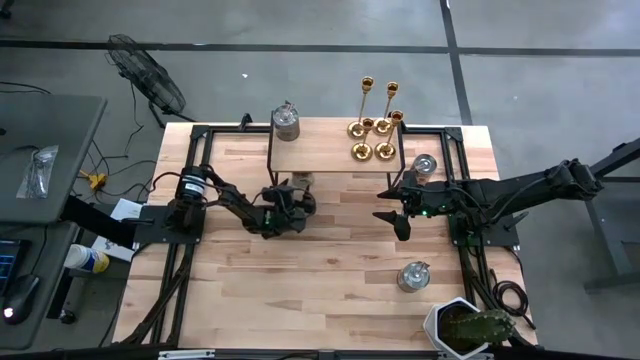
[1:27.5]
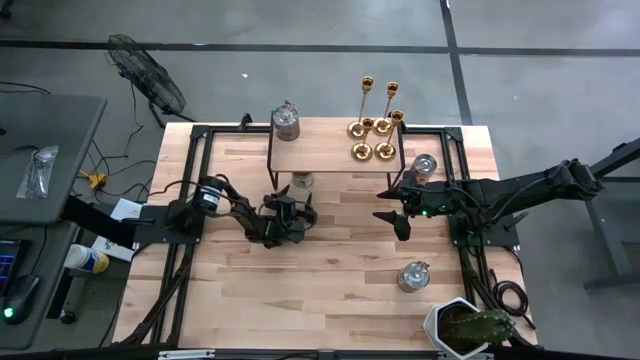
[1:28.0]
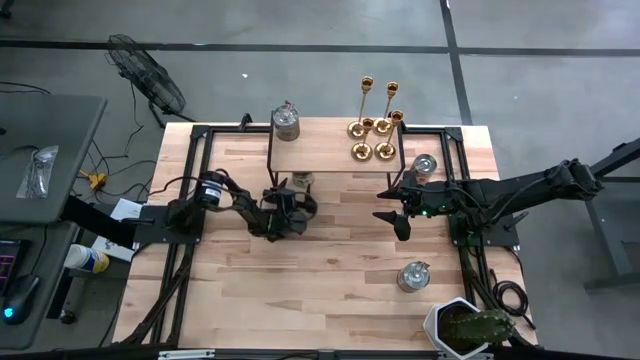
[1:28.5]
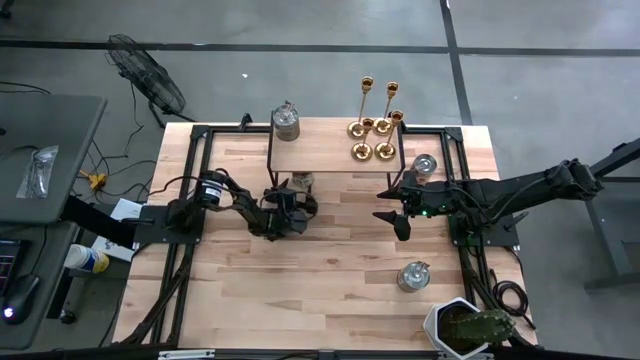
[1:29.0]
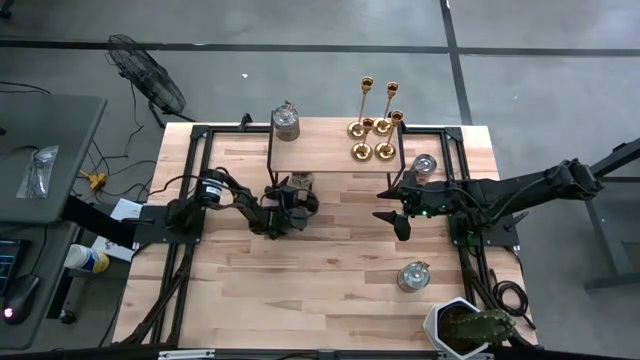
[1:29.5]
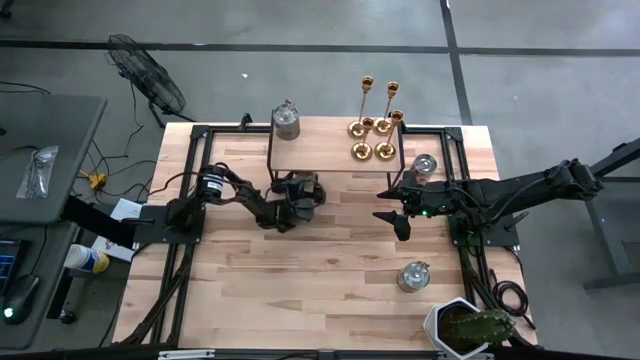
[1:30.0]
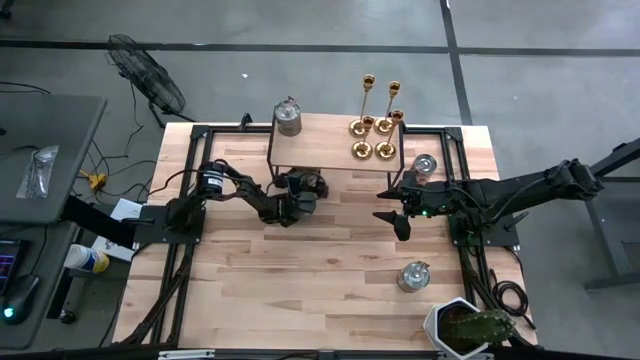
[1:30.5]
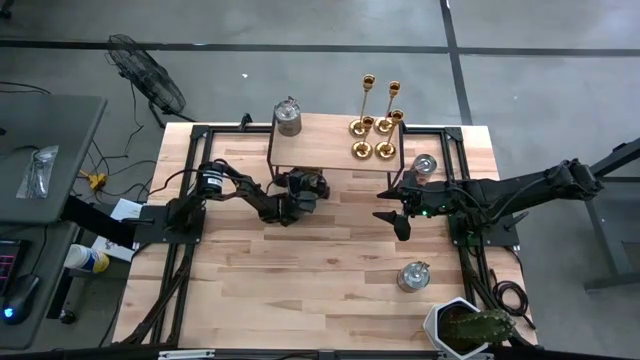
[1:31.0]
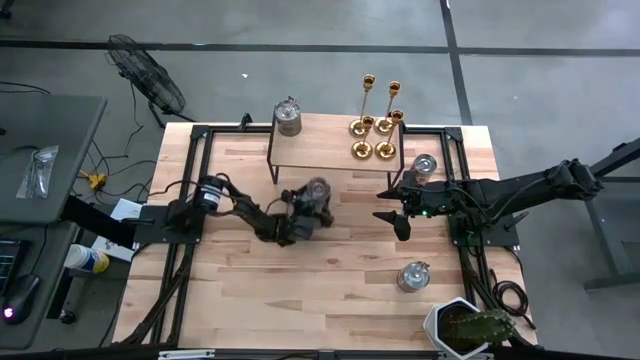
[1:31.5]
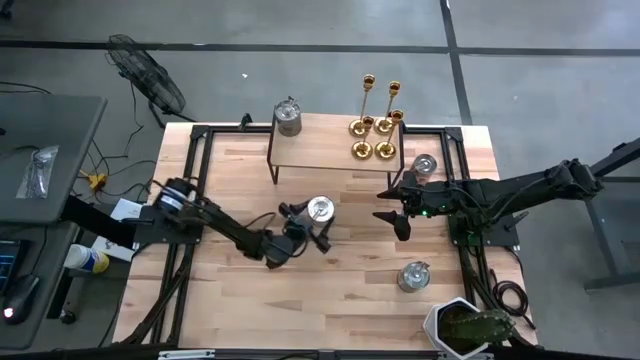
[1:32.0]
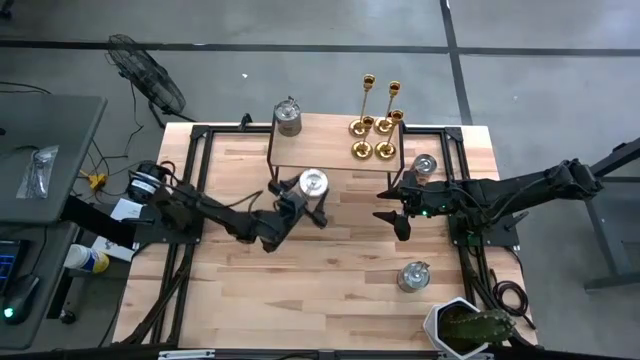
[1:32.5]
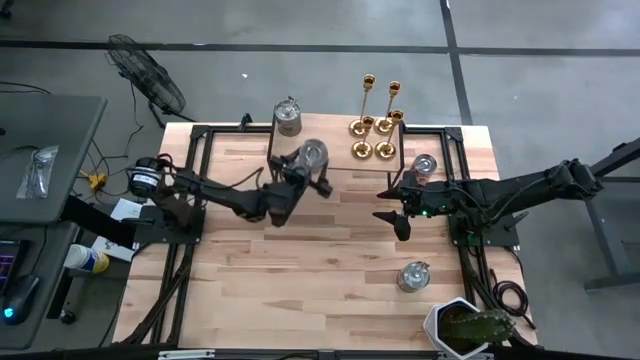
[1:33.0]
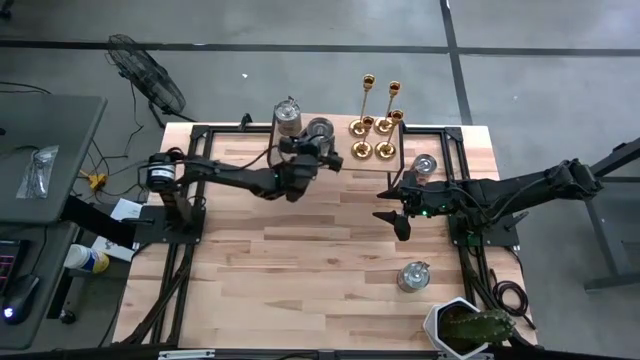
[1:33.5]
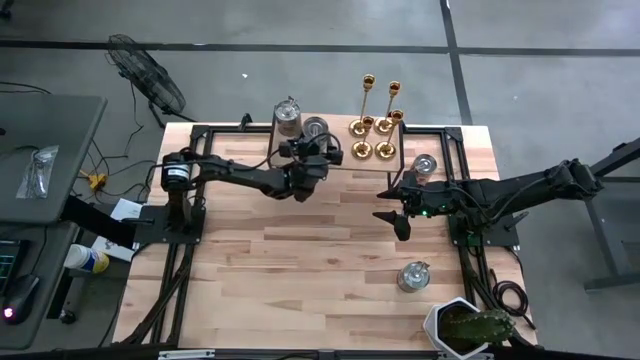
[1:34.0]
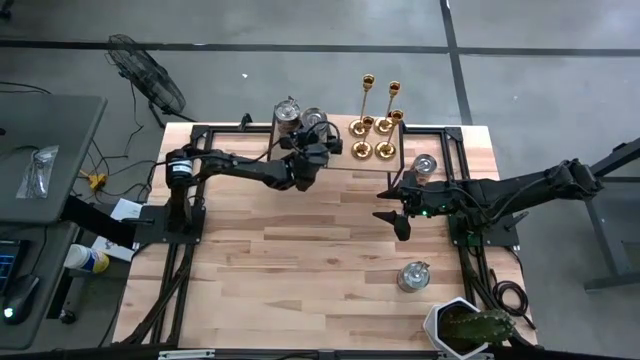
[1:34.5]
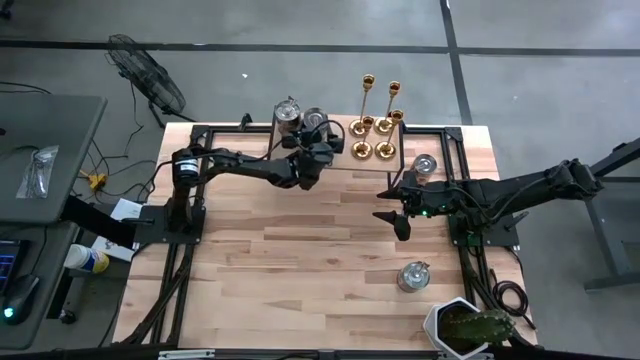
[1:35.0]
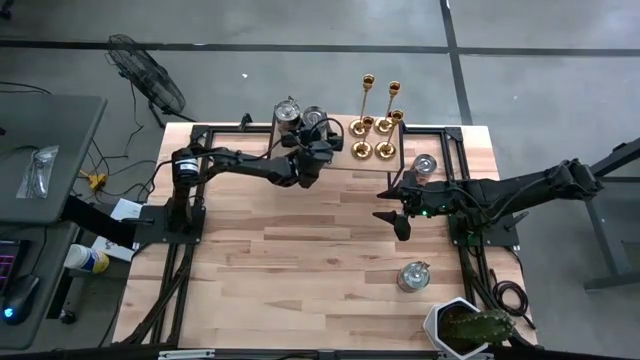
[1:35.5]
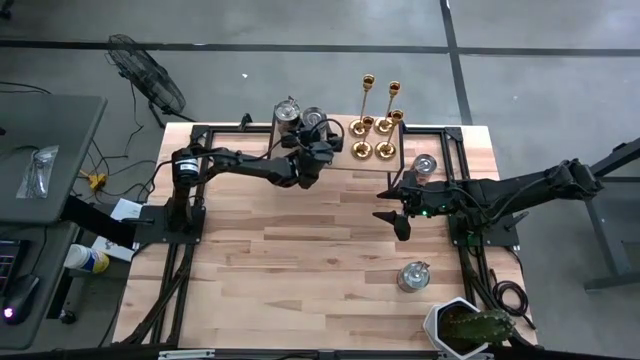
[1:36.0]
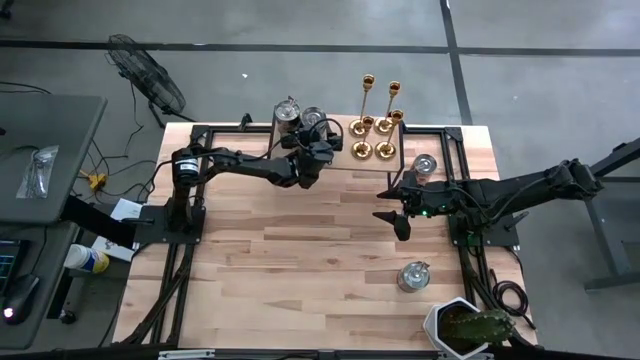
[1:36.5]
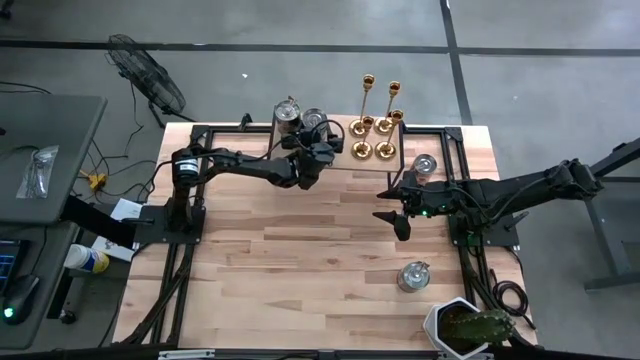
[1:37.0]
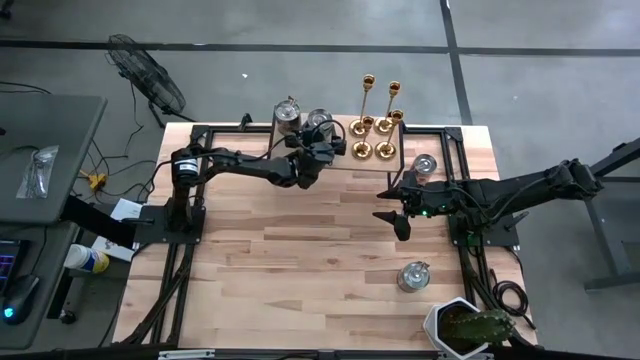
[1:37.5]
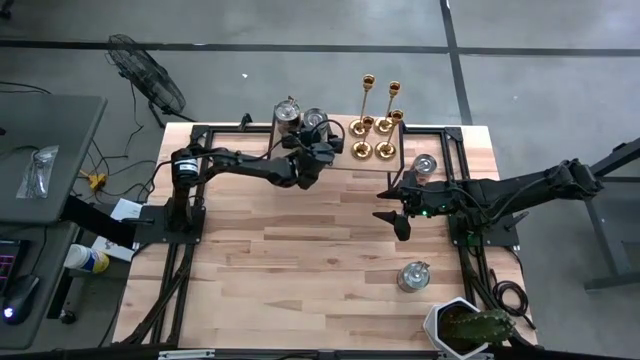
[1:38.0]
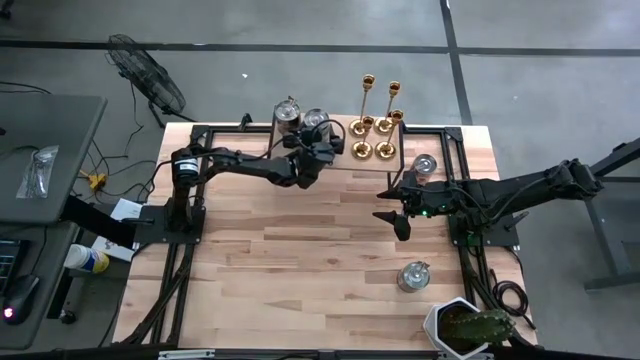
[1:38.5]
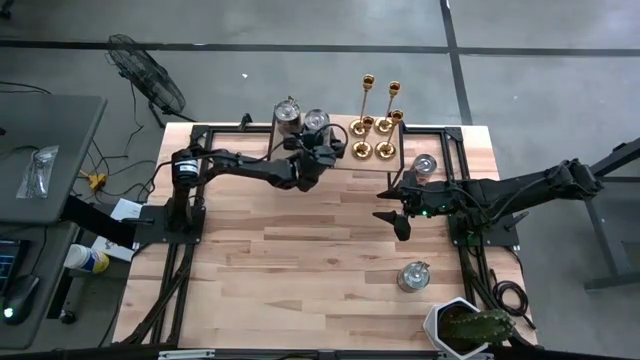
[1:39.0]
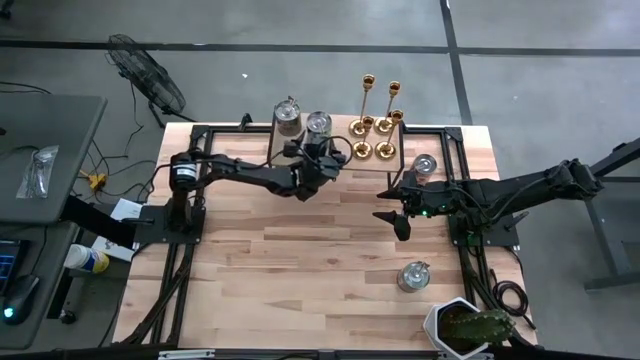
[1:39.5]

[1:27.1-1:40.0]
Task: Pick & Place candle stick holders
Put the silver scented candle on the shelf

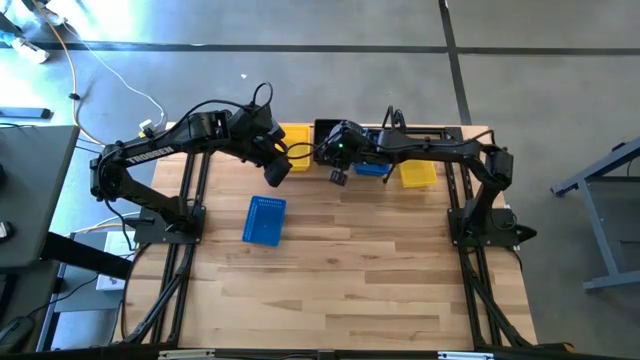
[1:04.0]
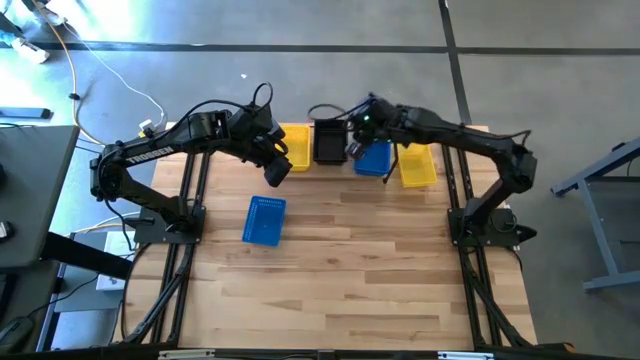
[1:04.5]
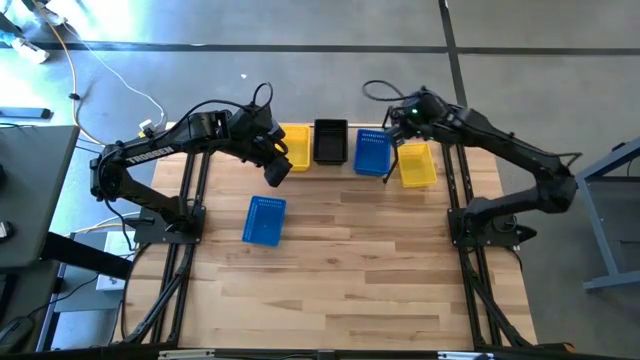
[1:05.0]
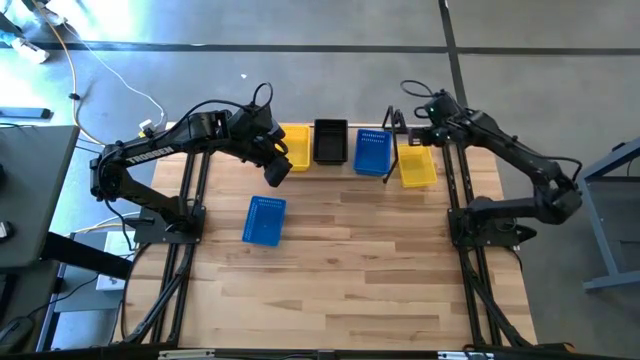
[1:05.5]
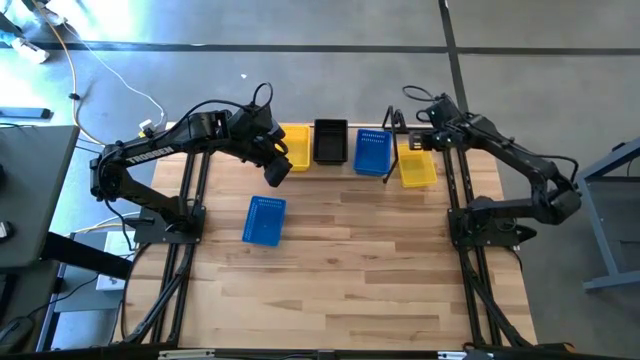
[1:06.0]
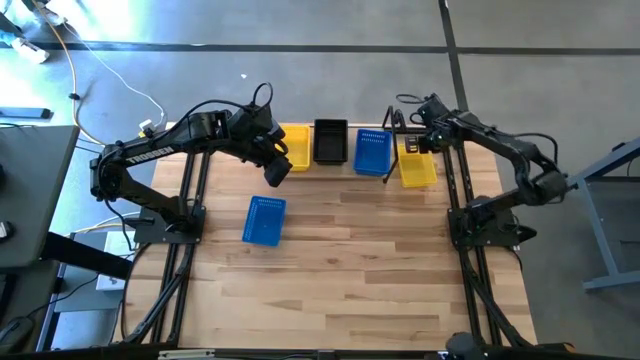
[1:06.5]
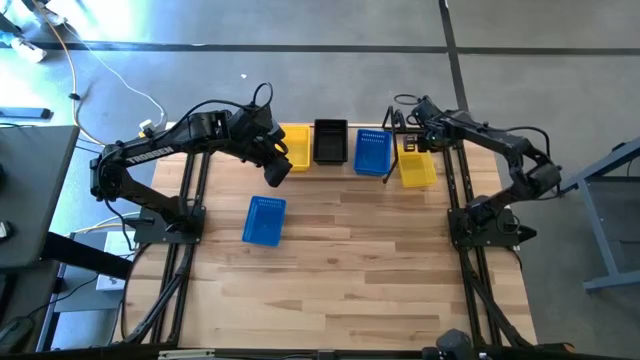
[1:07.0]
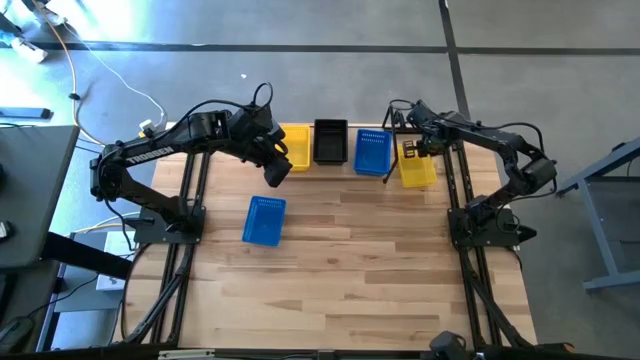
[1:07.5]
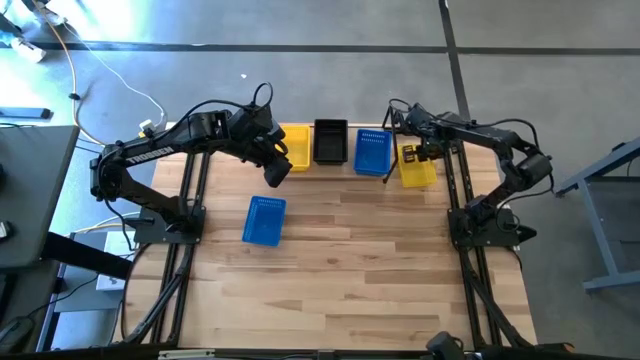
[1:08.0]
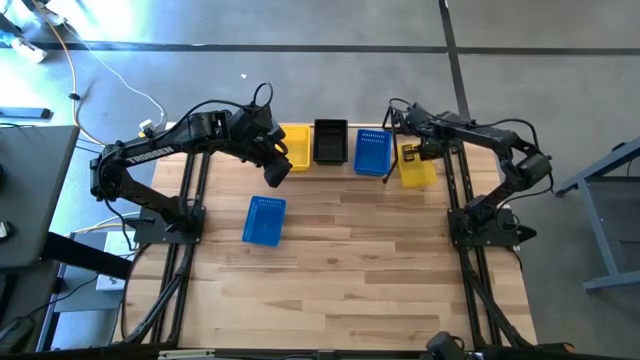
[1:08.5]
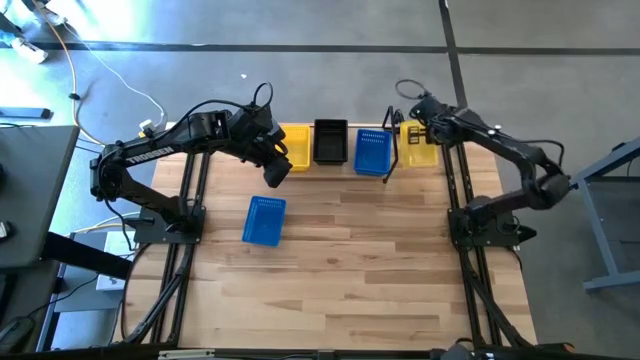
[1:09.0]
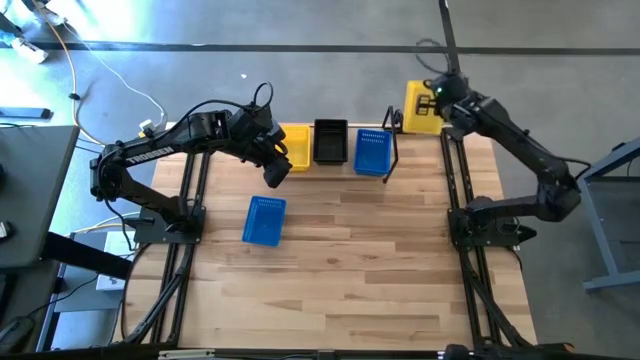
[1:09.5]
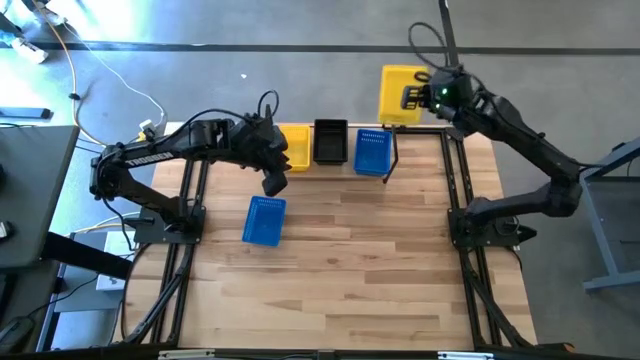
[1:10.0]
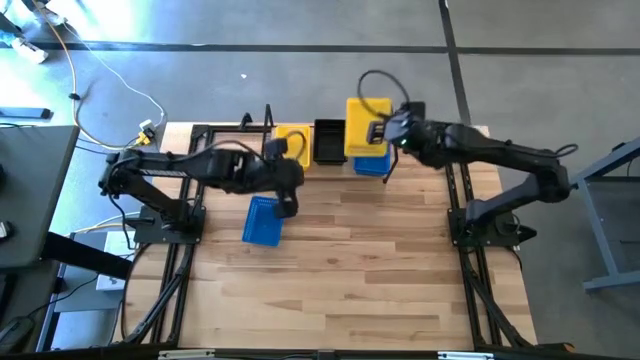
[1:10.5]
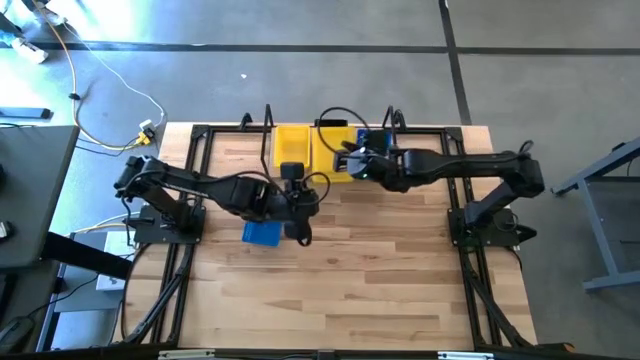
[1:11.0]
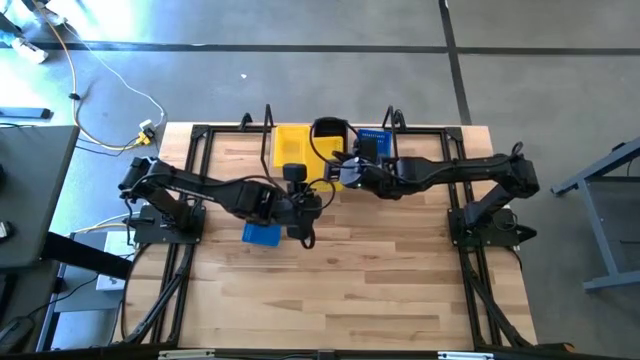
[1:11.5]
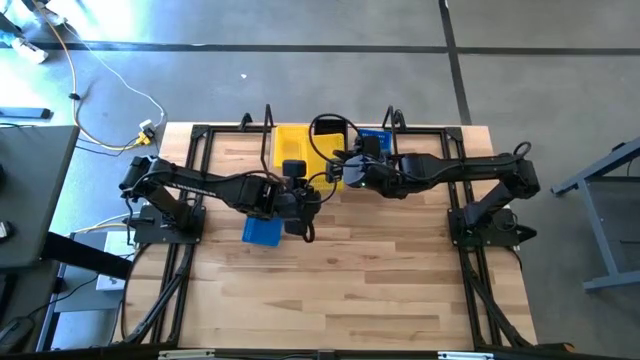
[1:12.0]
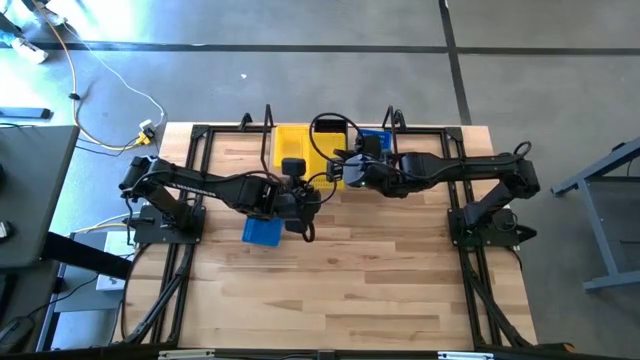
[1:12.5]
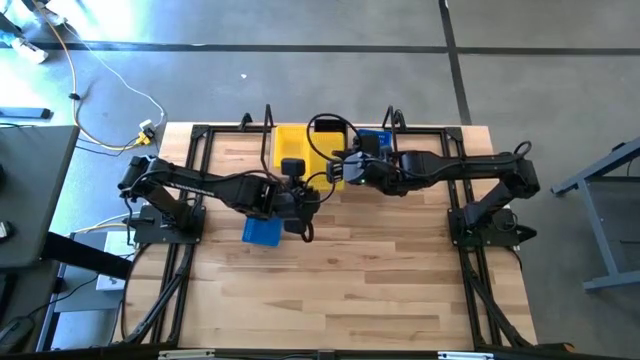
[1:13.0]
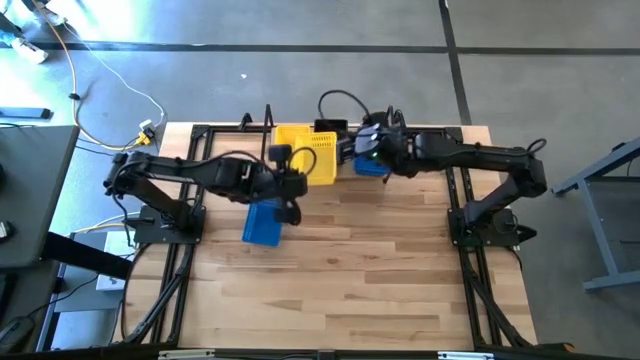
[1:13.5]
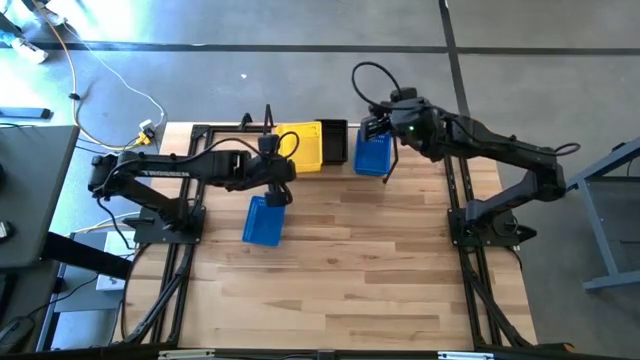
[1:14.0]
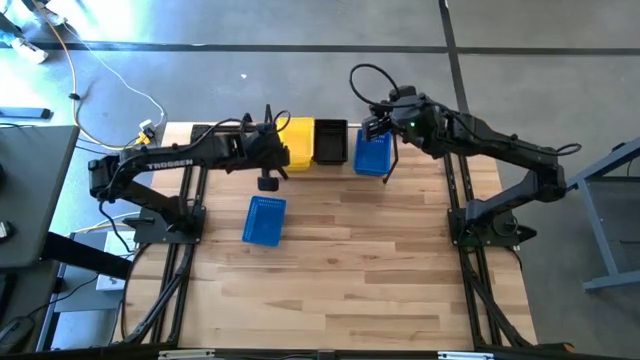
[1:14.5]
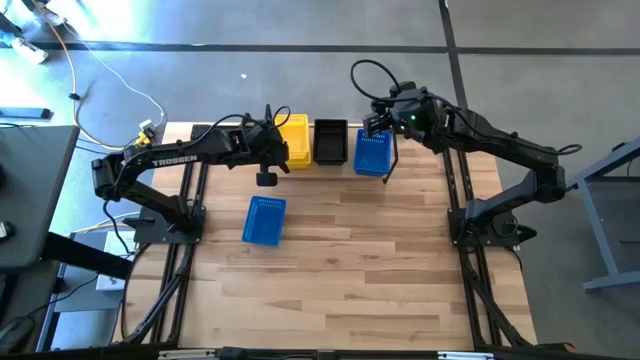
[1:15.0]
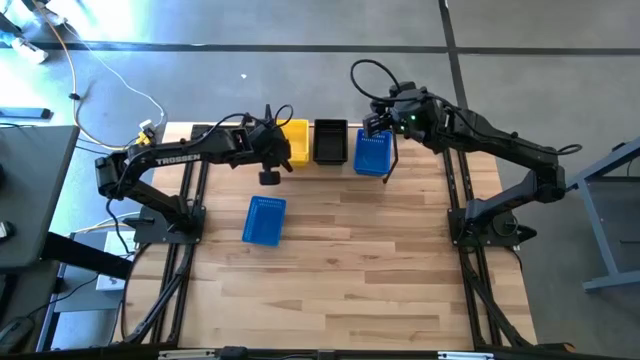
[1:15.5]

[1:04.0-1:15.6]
Task: Stack baskets on shelf by color
Stack the yellow bin on top of the other yellow stacked bins on the shelf
